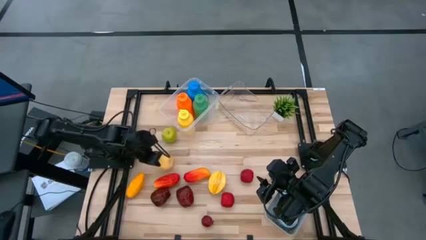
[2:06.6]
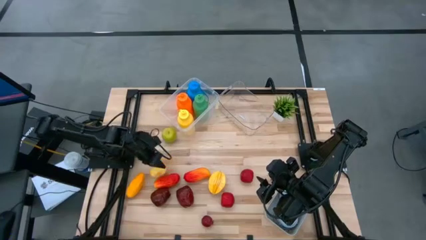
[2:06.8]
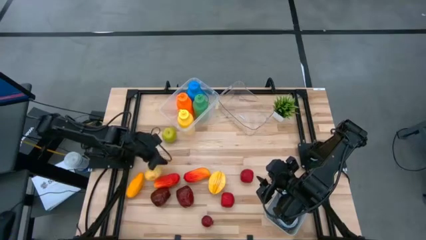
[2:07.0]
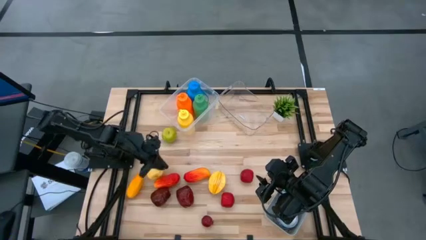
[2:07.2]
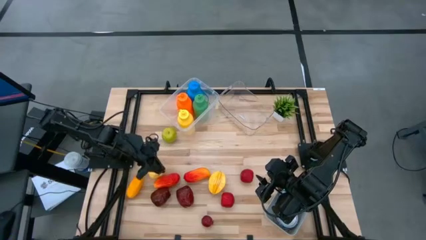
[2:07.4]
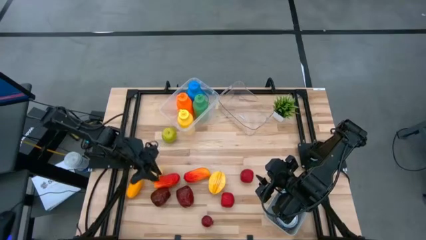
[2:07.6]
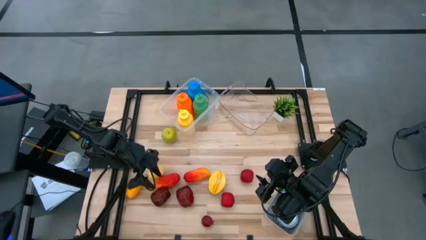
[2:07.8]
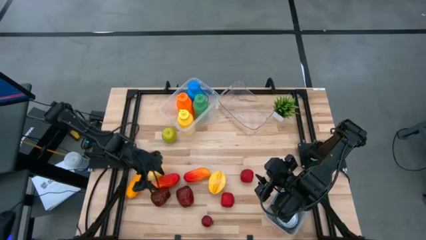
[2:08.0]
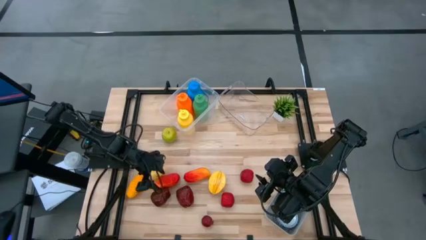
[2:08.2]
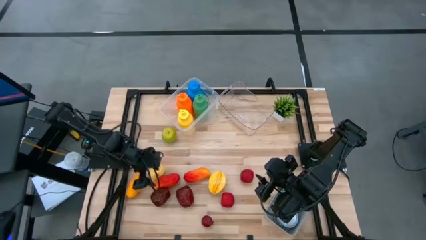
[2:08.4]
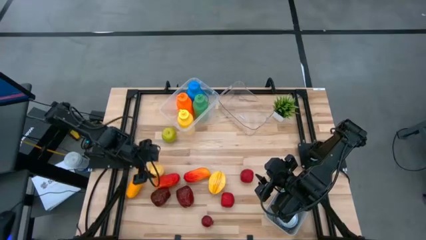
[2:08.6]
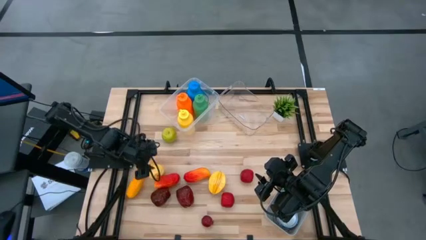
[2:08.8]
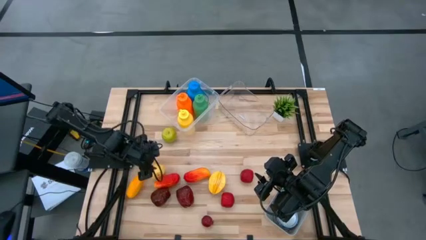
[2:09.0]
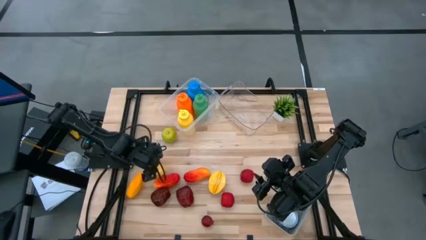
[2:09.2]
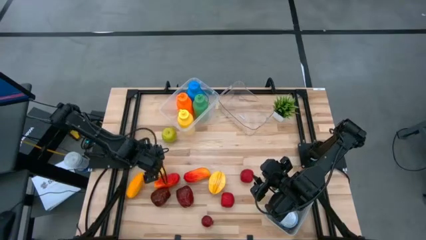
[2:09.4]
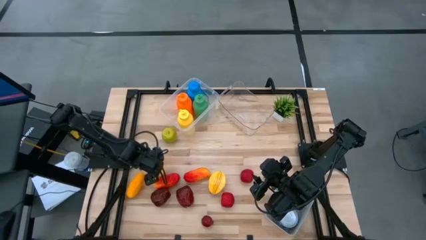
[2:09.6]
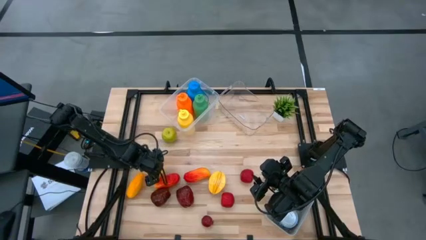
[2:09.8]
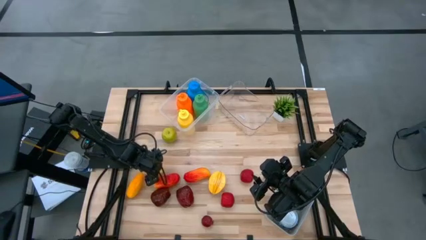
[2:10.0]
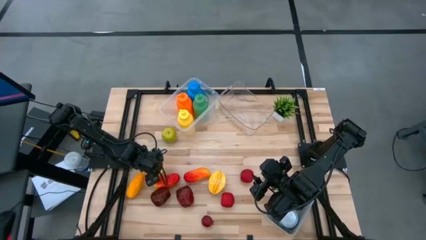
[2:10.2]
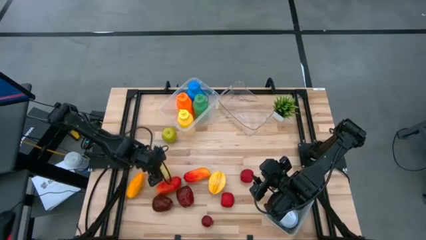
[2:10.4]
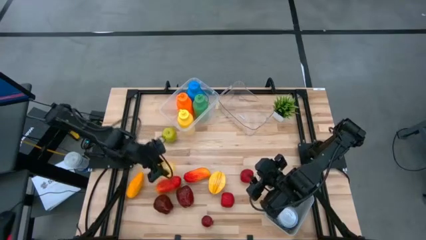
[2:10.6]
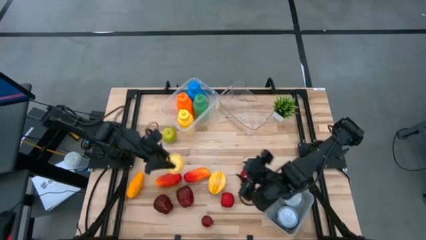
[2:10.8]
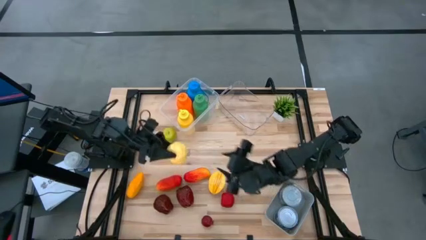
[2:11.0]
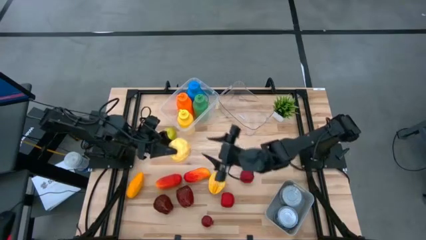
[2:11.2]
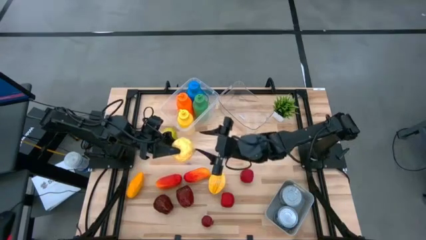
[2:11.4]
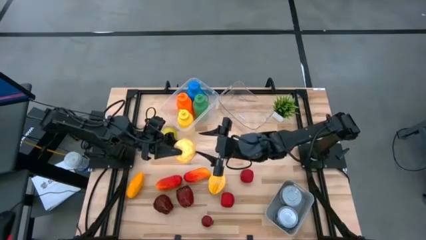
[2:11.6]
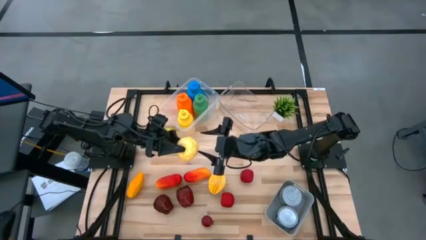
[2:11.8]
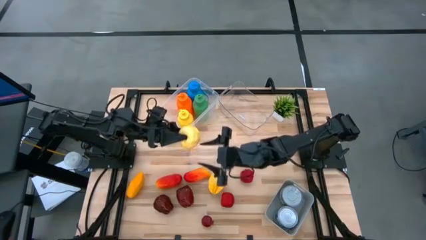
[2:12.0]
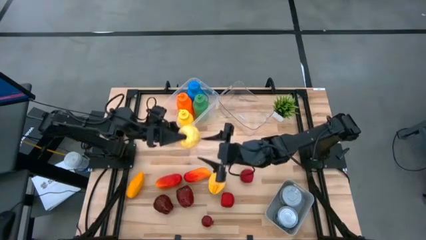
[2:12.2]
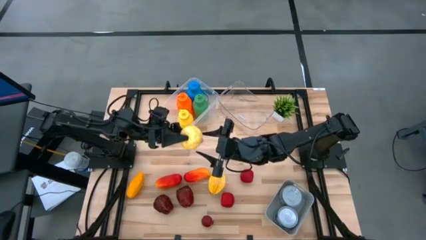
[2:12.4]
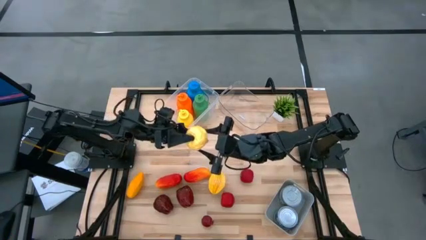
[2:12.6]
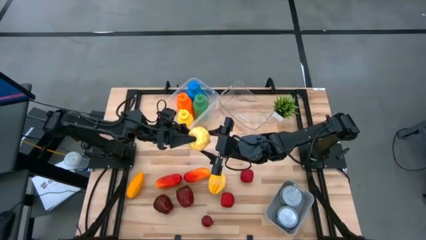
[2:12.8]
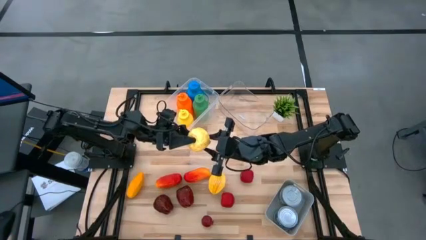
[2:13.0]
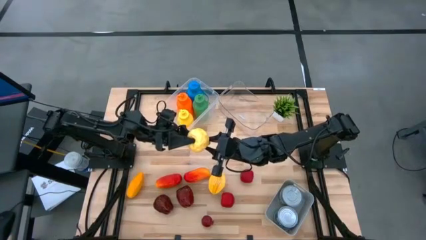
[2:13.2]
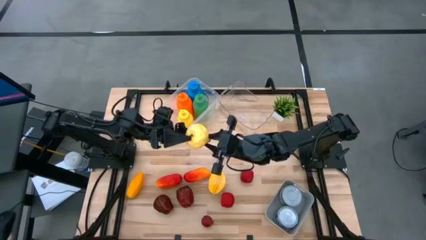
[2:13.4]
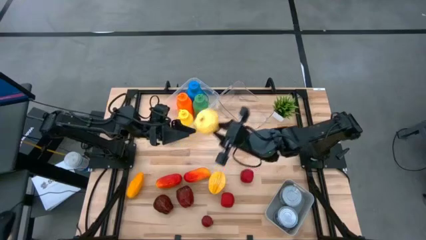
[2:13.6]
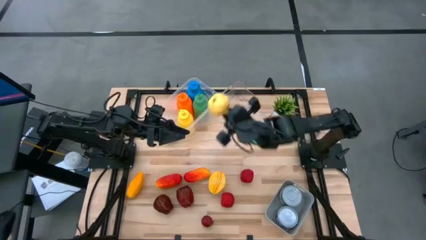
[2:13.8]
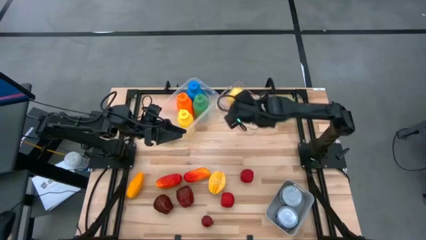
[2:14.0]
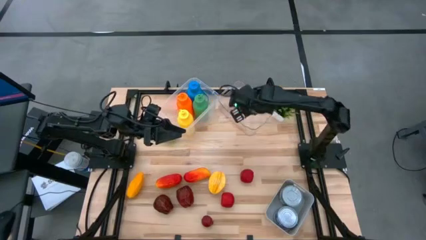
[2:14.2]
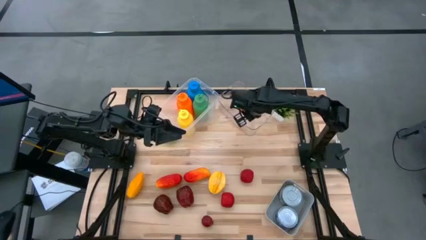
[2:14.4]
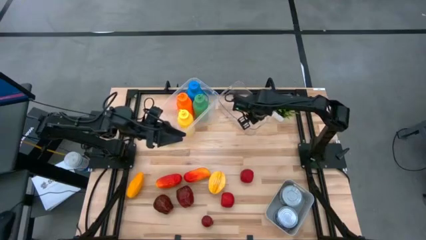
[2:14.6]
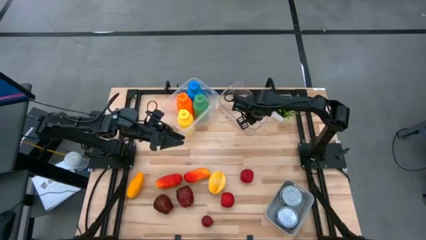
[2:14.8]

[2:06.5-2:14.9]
Task: Pick & Place Food Item
Put the pear into the right transparent bin

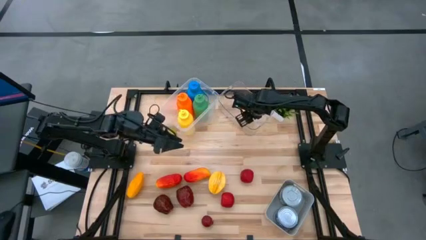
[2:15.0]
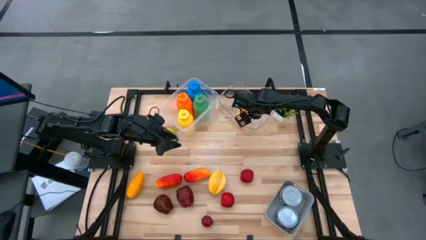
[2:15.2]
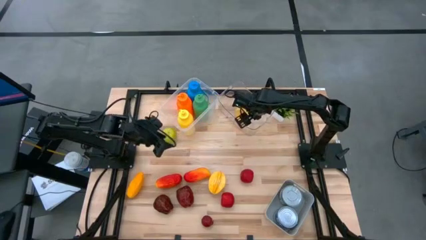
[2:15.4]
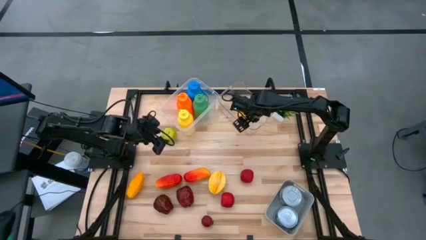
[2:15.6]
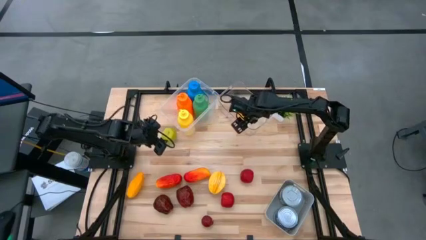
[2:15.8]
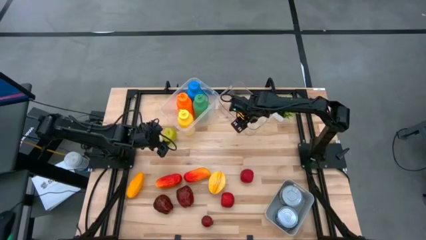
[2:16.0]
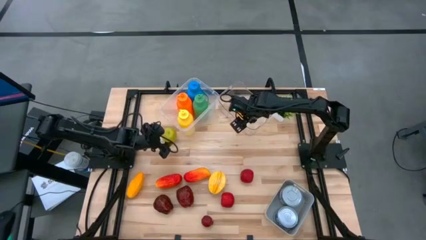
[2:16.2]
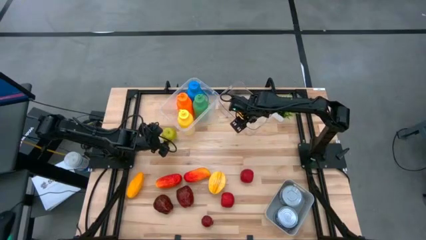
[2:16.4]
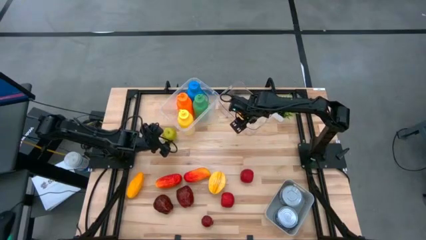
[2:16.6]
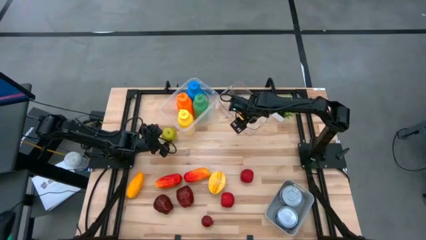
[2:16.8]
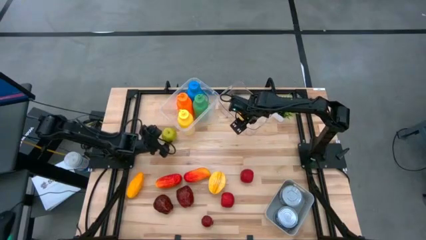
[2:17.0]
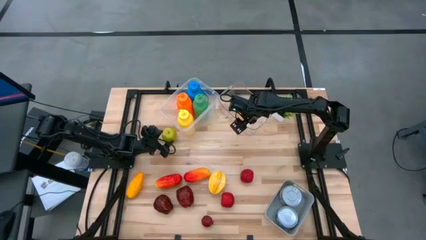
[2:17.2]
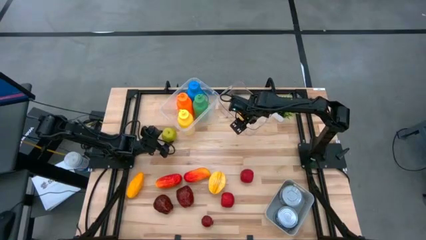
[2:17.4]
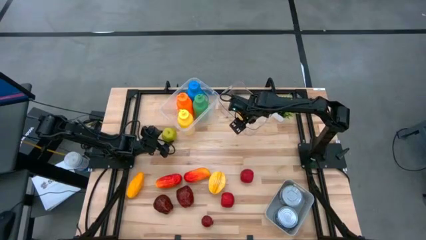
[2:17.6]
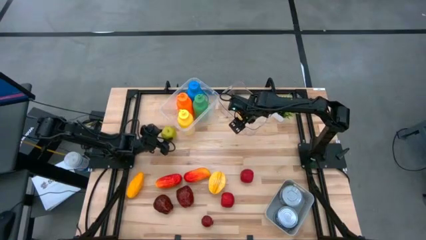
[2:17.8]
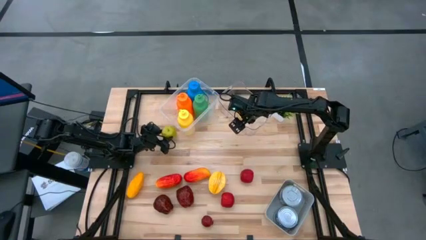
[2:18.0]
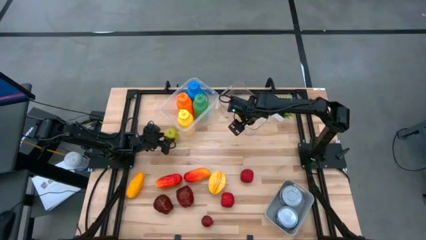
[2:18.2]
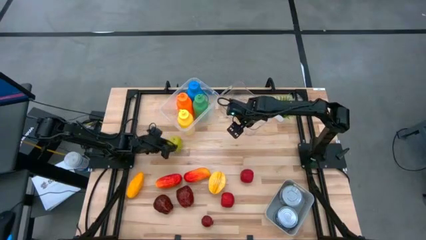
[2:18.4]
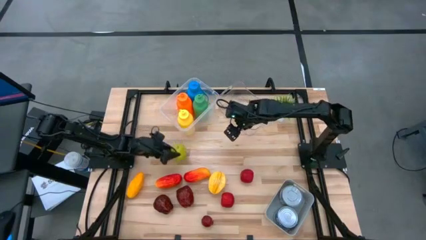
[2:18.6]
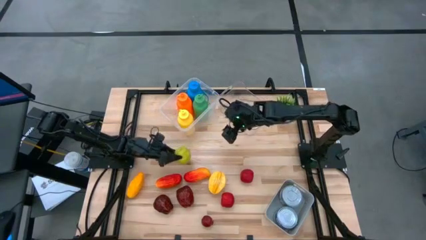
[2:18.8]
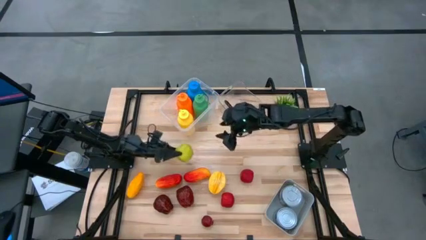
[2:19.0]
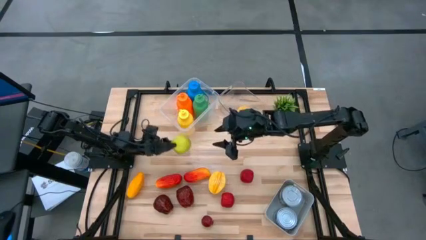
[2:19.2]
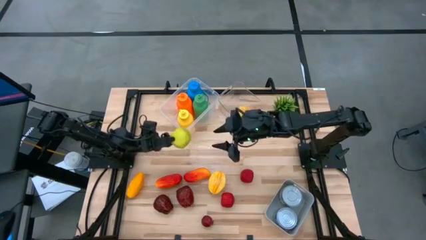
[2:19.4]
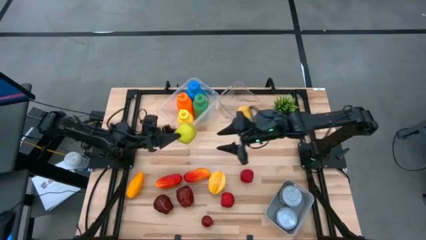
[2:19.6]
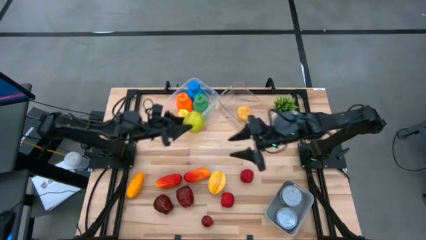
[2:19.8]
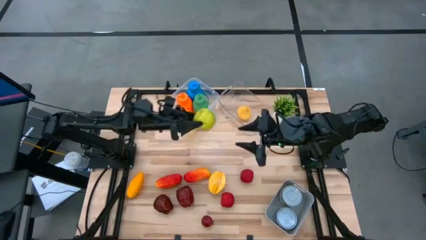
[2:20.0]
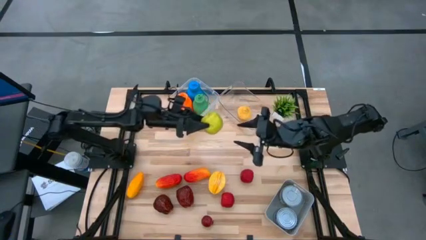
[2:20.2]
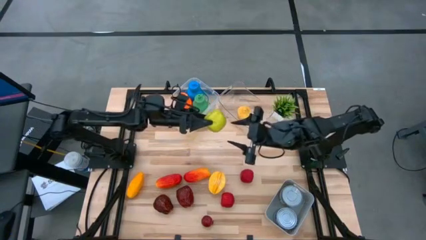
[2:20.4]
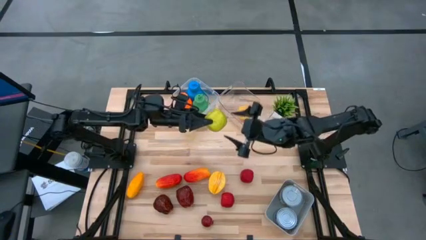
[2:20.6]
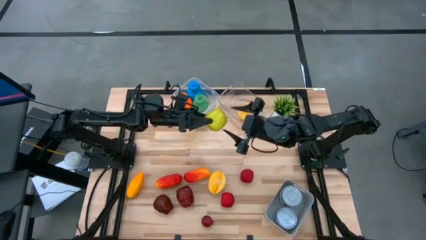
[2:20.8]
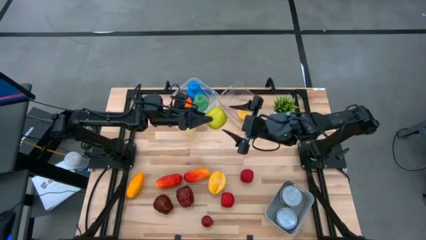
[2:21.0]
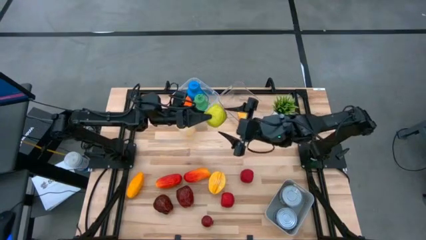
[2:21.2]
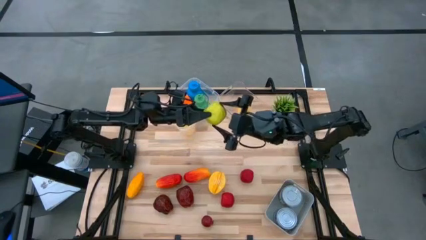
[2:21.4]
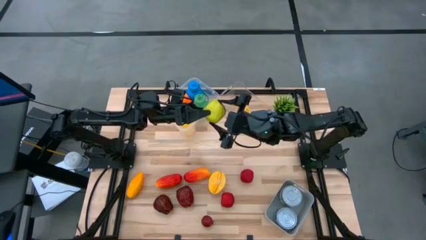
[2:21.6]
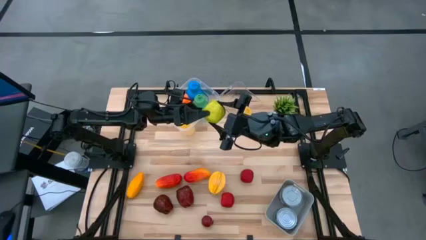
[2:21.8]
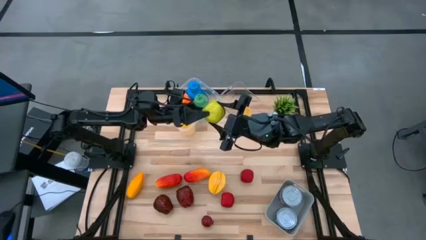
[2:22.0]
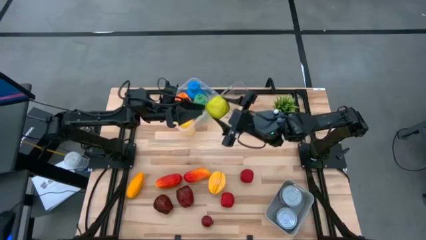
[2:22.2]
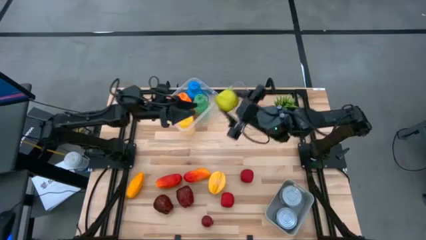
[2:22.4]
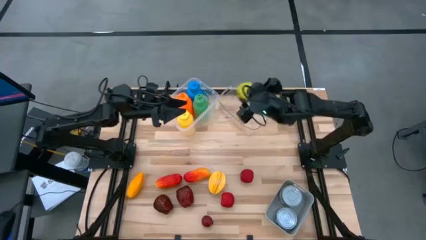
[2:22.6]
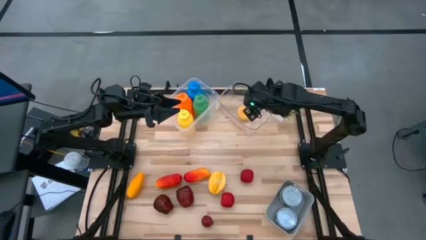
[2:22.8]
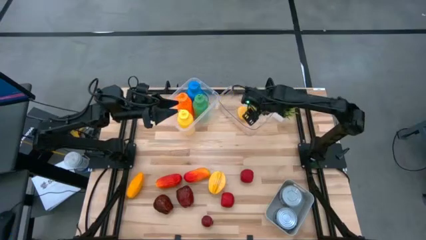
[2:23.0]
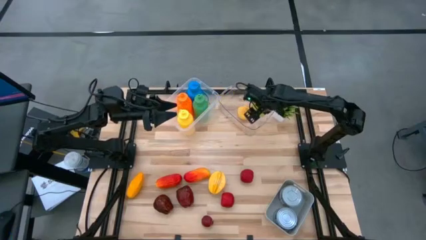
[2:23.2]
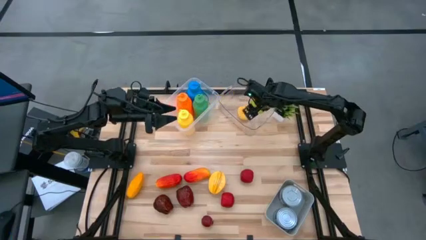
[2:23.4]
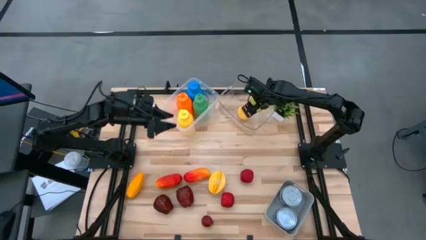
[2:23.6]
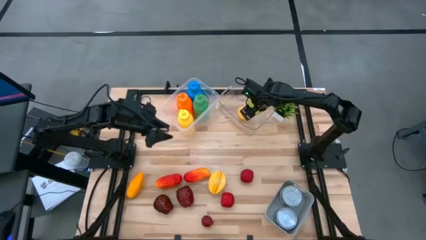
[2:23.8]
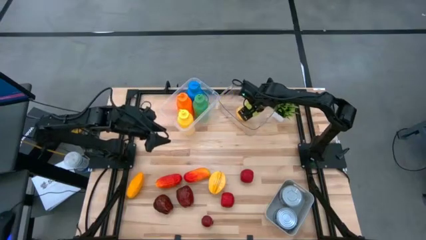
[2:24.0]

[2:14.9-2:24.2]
Put the green apple into the right transparent bin
